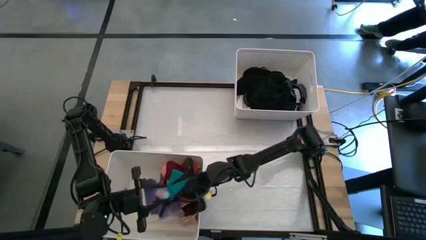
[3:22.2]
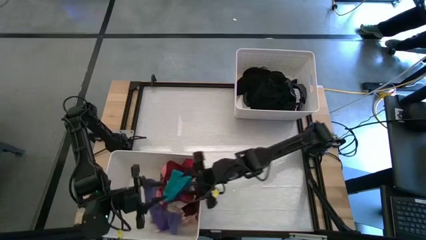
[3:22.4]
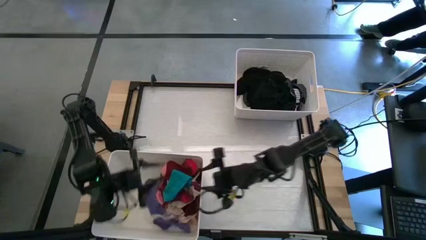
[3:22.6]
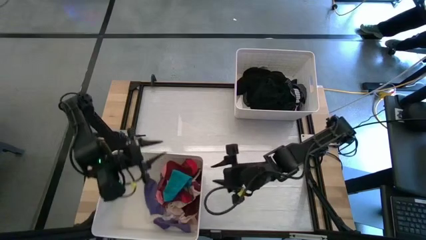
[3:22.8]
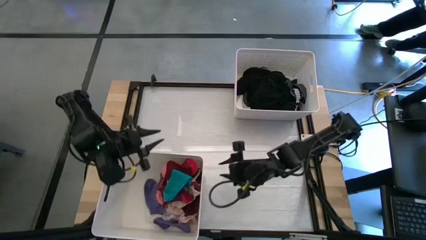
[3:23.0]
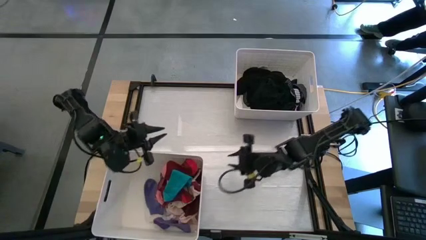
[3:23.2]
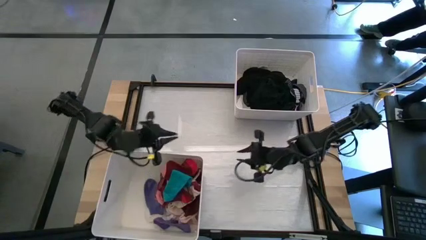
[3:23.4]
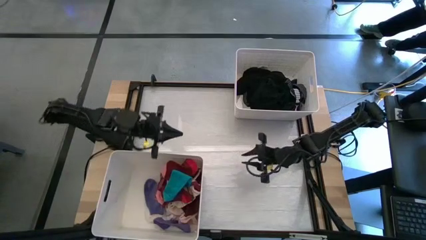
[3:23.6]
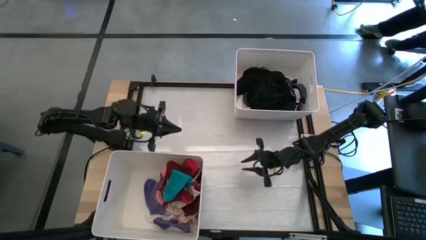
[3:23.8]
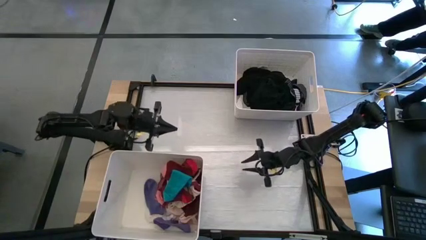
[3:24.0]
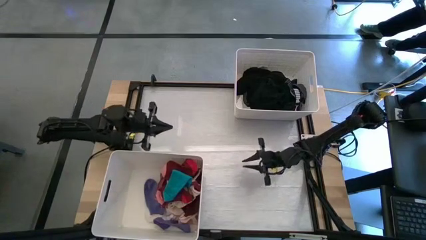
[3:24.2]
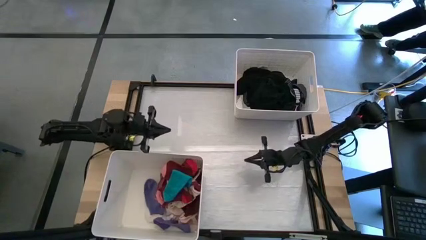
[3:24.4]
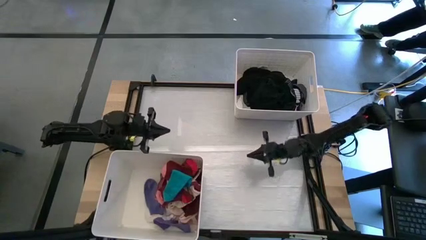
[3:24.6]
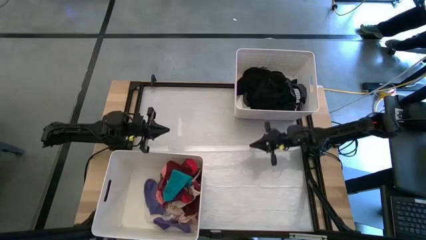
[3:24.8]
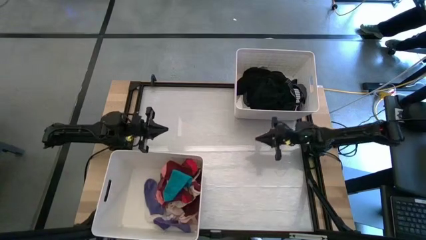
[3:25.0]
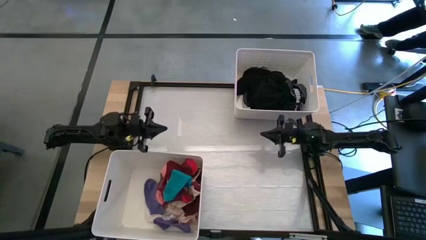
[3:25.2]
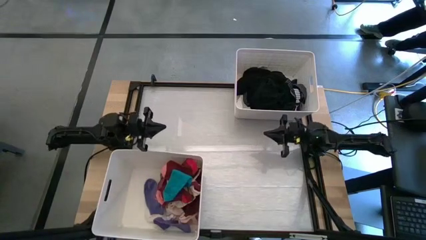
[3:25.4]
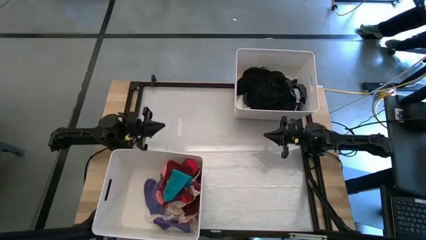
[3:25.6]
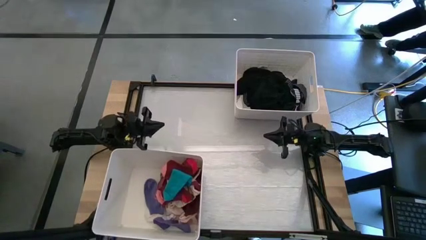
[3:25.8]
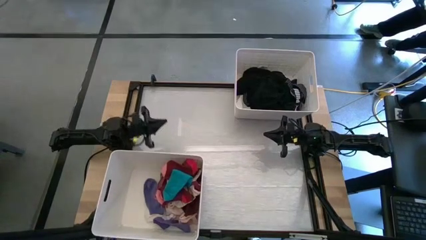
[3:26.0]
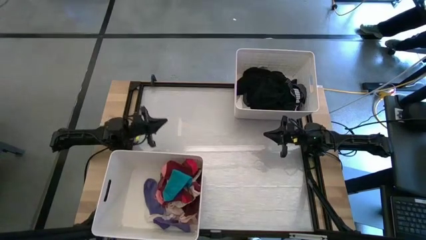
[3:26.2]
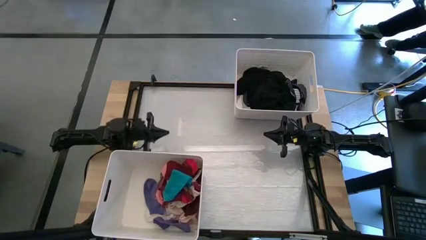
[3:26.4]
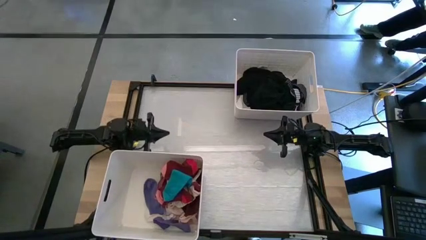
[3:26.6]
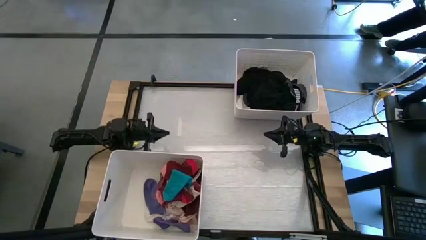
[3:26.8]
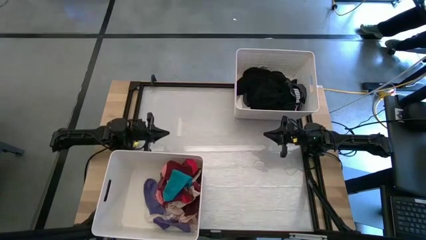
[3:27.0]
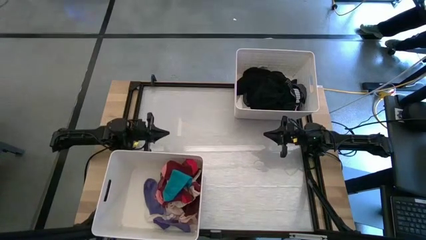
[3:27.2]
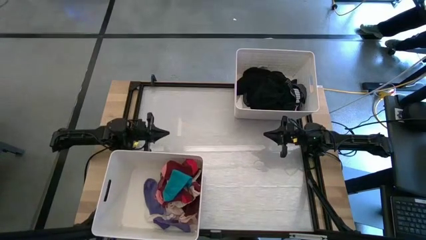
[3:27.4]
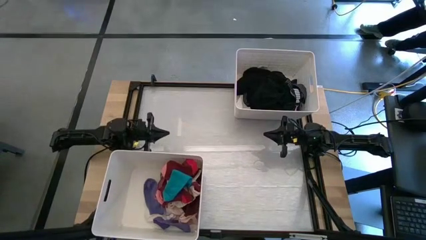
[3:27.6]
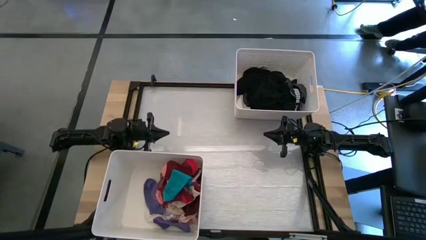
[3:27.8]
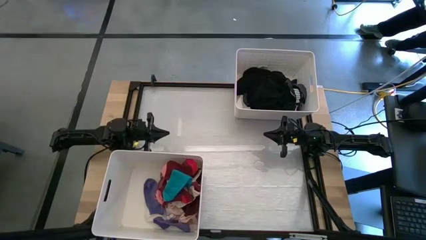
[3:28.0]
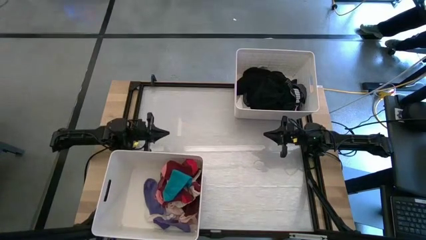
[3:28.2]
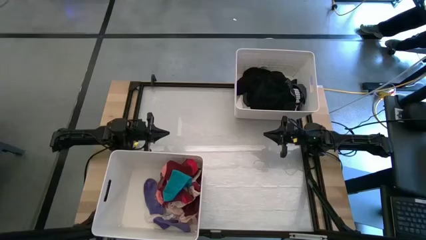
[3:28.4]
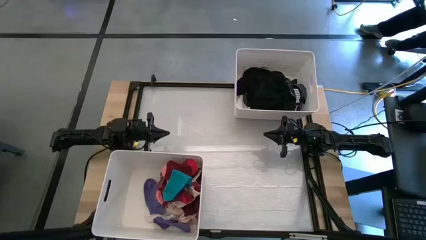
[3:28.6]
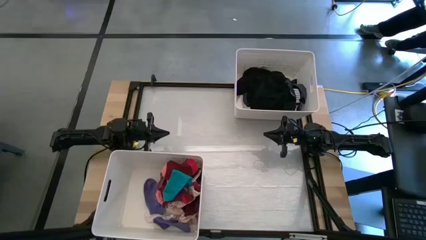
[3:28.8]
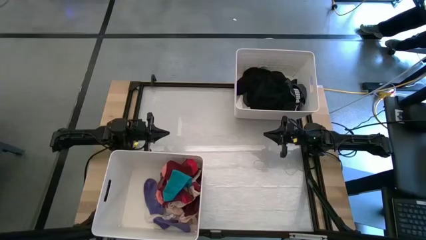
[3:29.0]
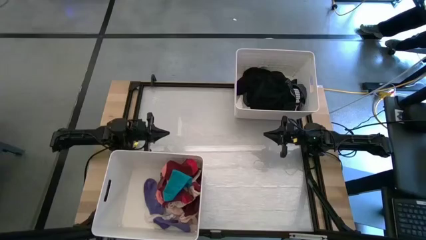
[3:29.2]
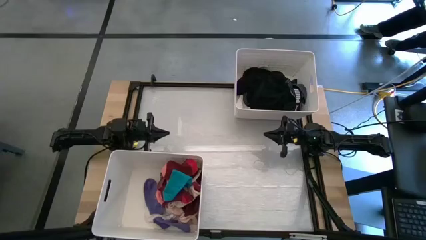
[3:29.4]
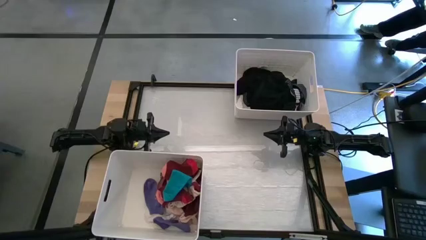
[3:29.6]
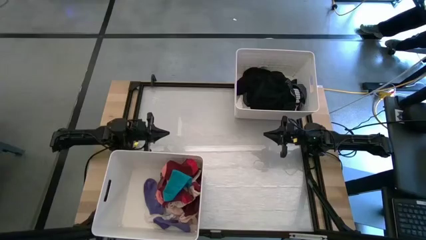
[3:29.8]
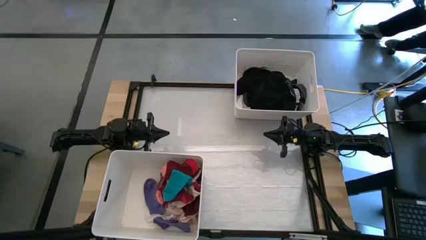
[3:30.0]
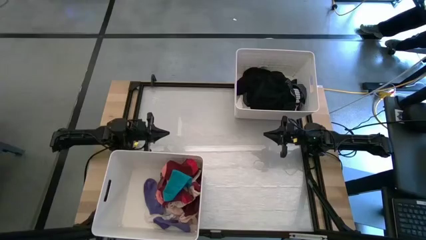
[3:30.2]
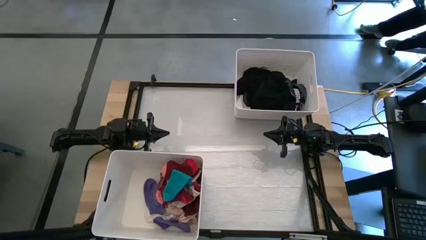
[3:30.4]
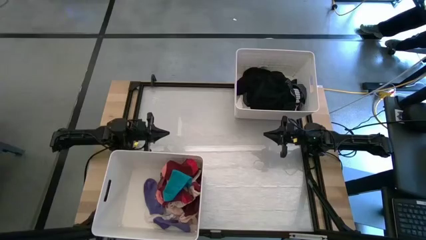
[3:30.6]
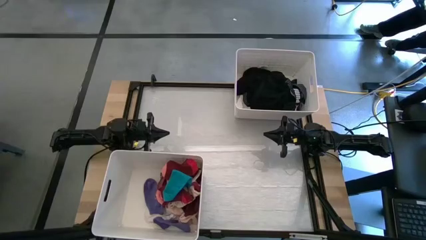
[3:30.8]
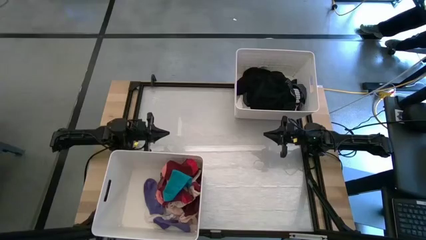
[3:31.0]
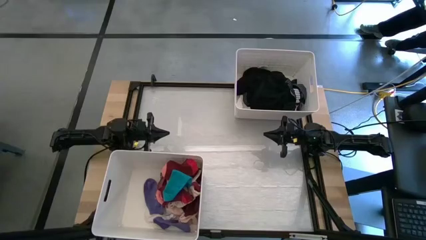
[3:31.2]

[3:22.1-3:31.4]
Task: Sort clothes
Return to Home Position

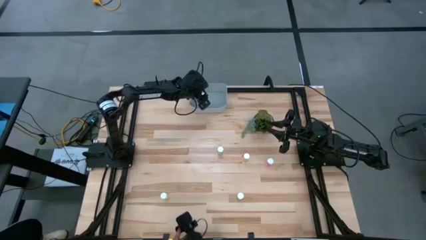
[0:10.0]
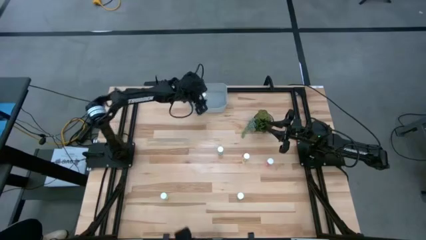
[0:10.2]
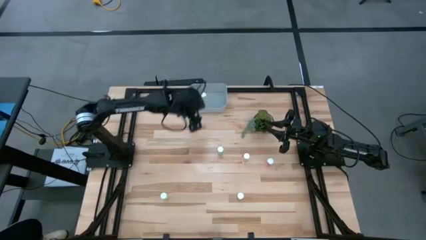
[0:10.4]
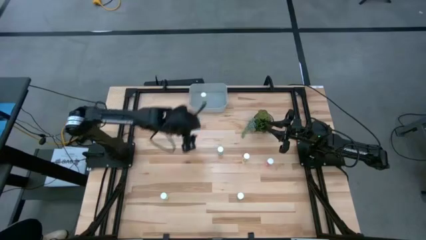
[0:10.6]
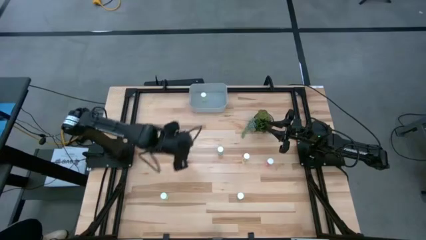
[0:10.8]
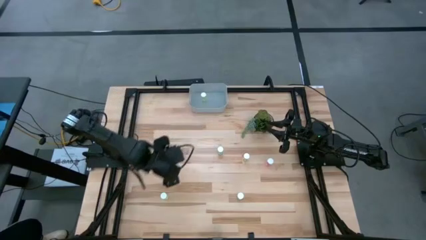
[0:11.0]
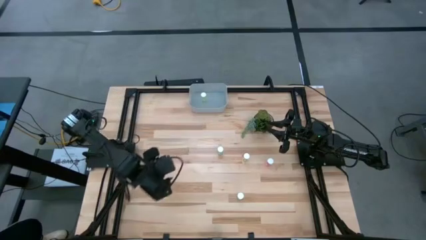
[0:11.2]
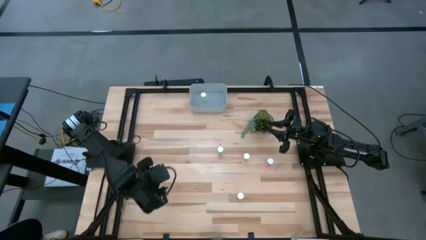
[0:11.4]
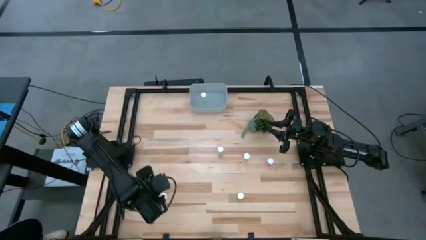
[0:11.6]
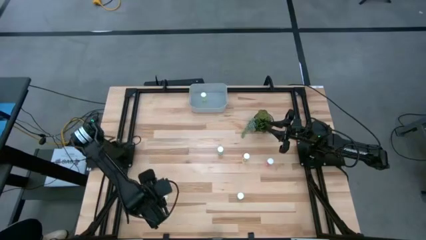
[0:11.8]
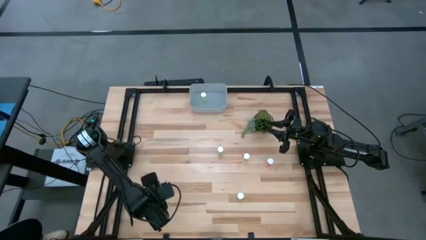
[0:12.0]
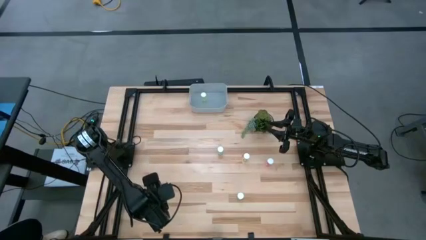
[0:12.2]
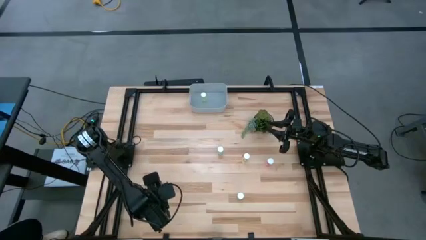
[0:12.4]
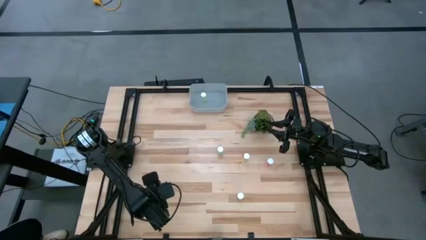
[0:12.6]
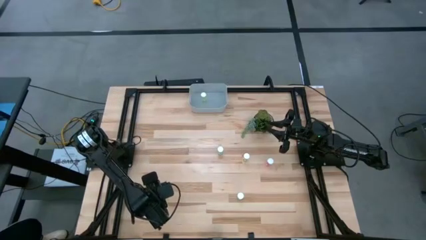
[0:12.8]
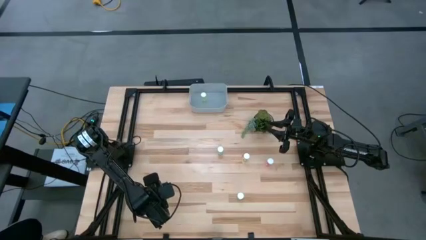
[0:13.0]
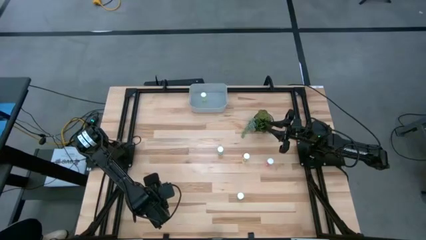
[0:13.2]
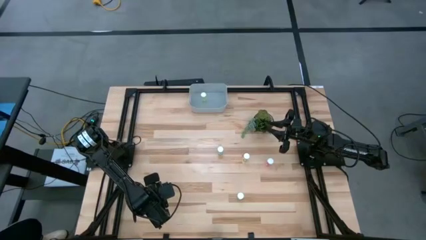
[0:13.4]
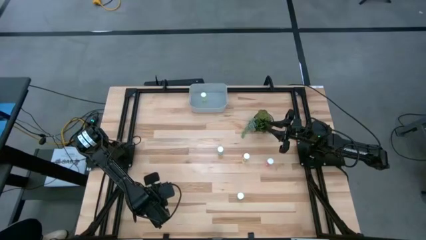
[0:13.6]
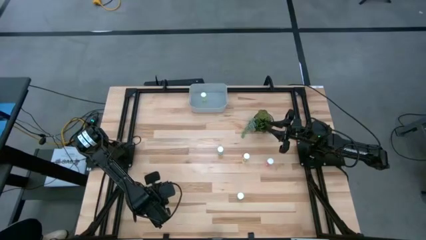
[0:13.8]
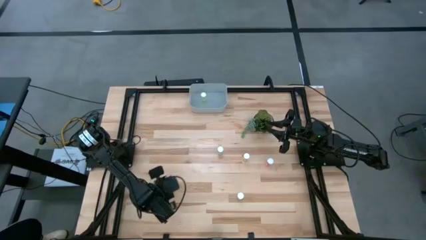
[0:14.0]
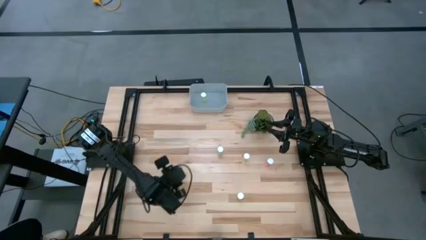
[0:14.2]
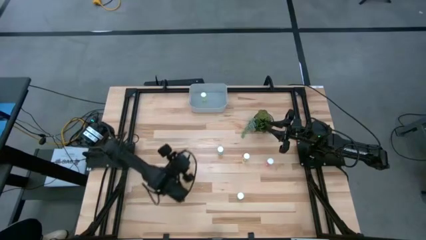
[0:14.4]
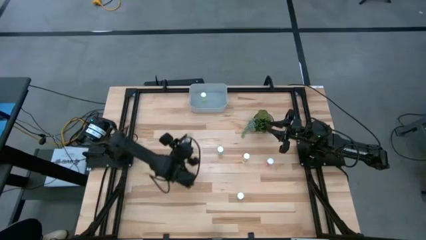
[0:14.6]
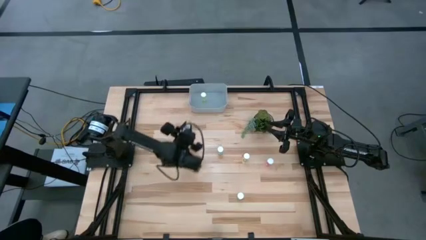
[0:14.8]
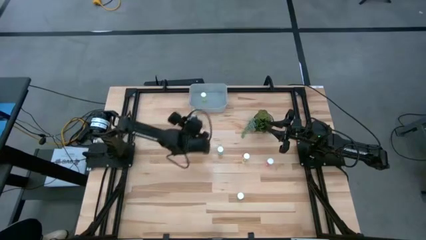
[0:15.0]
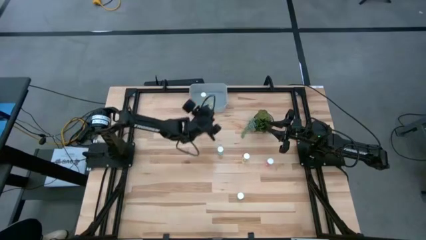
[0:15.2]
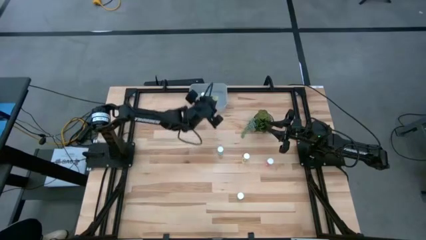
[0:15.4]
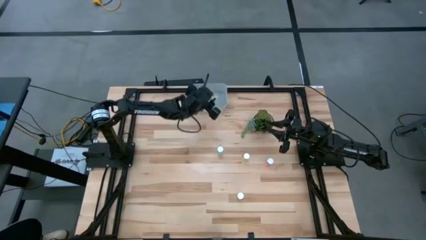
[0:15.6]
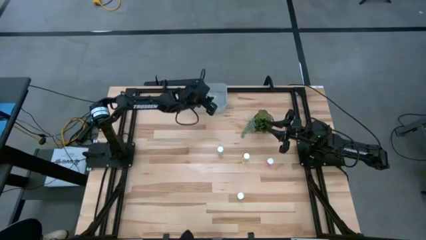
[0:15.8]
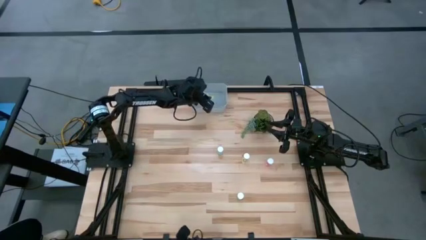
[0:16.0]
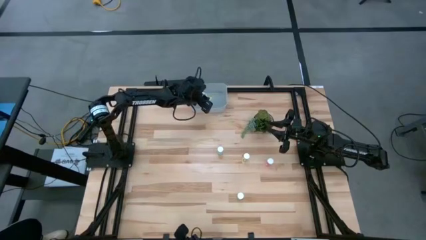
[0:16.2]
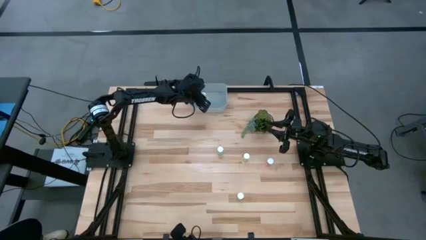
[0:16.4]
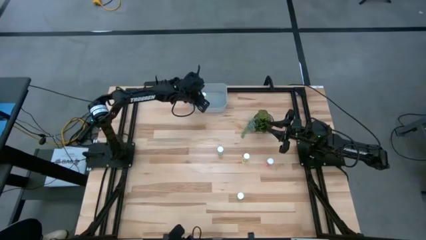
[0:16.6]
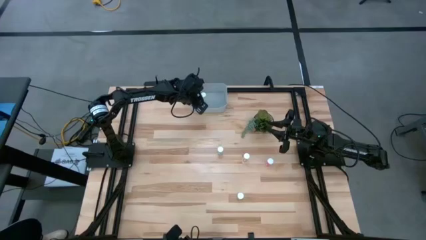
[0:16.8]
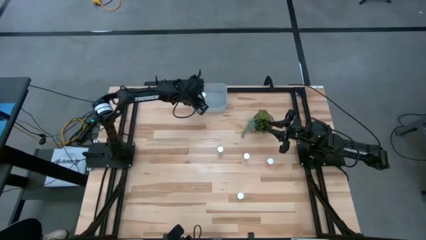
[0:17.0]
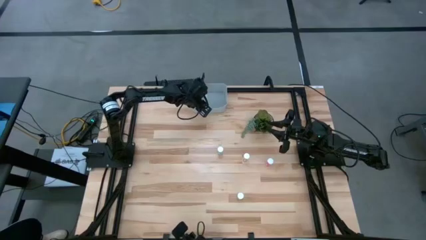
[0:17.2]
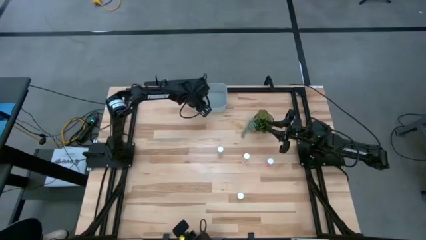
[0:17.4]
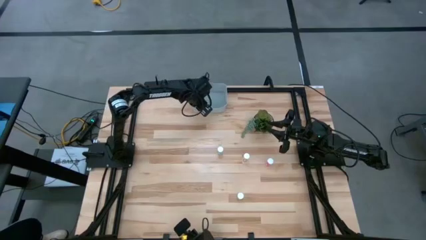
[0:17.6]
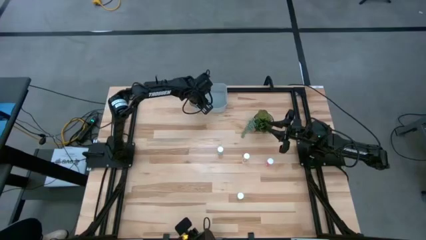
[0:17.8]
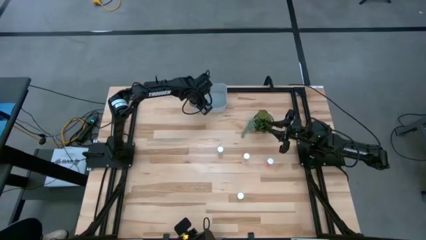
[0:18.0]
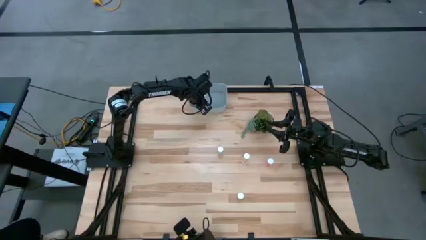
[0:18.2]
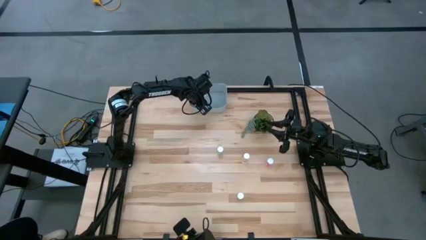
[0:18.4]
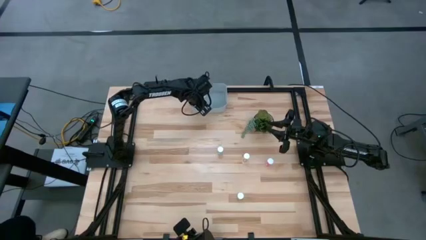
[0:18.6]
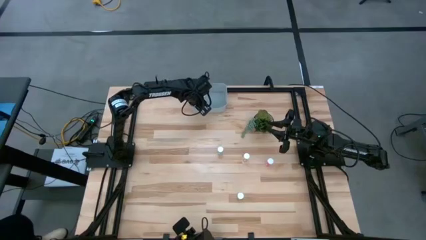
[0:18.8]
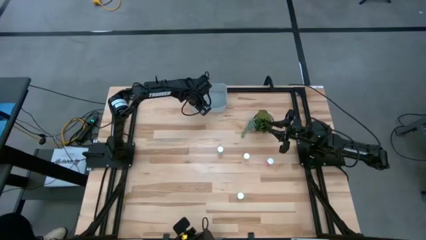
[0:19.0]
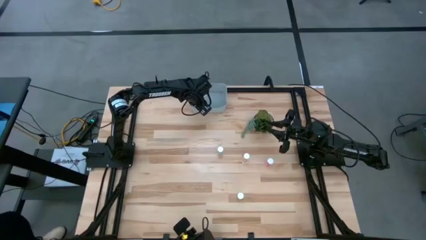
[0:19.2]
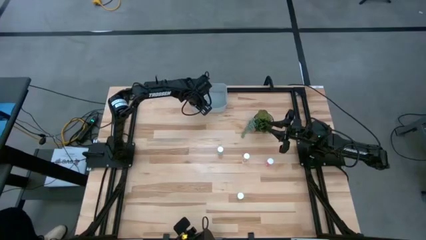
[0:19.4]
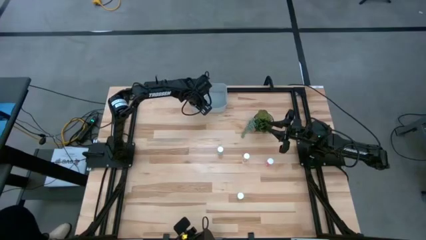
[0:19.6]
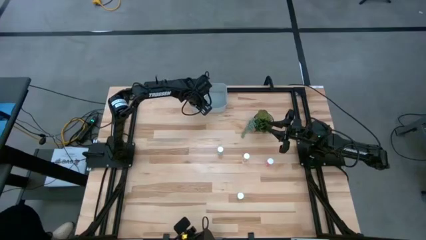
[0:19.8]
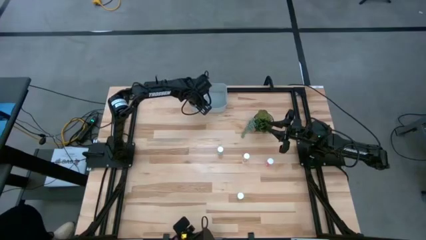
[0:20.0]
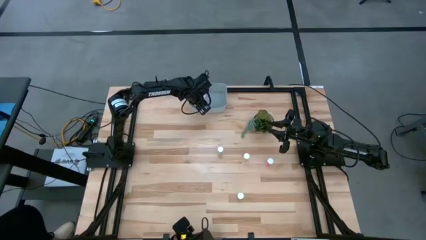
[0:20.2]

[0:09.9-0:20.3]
Task: Pick and place pill bottles into a basket
Put the left yellow medicine bottle in the gray bin
